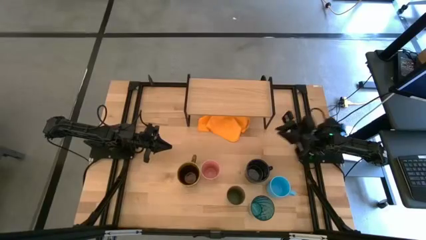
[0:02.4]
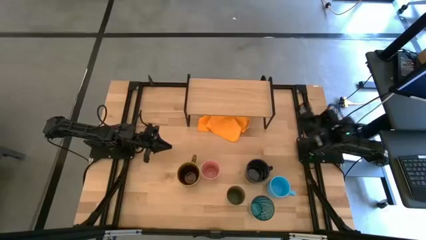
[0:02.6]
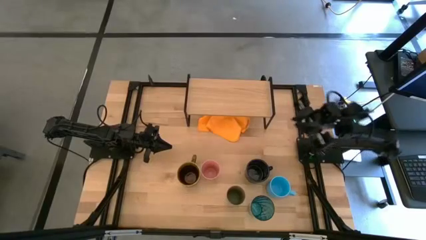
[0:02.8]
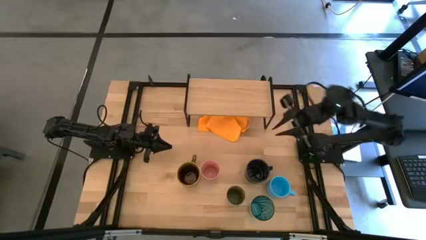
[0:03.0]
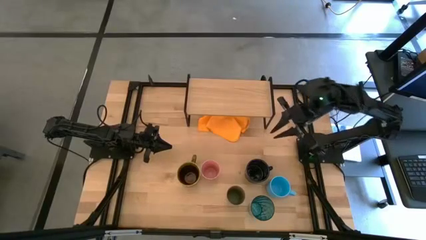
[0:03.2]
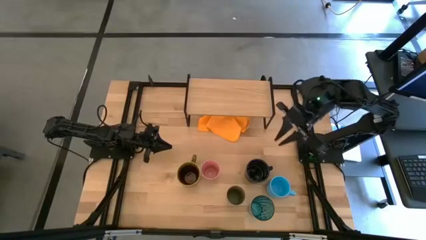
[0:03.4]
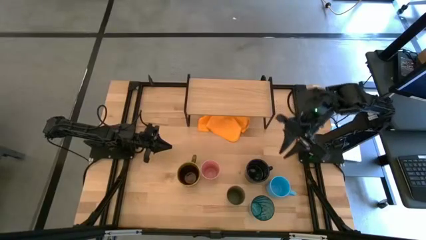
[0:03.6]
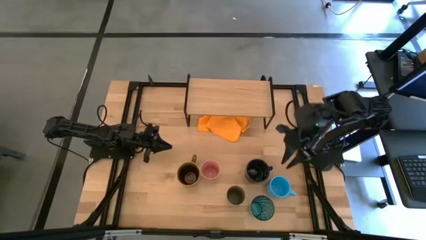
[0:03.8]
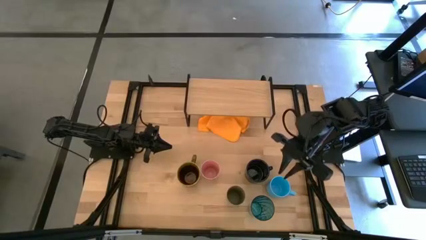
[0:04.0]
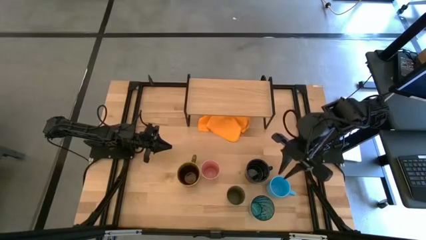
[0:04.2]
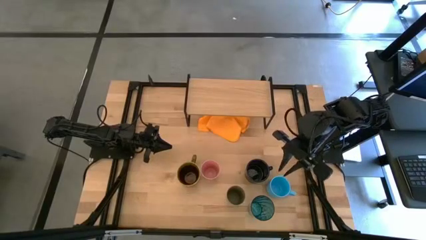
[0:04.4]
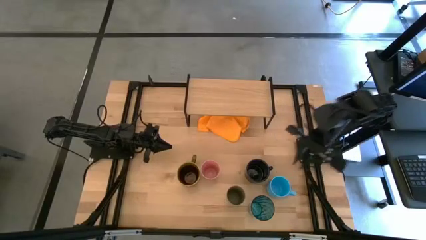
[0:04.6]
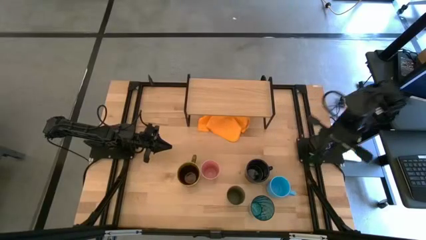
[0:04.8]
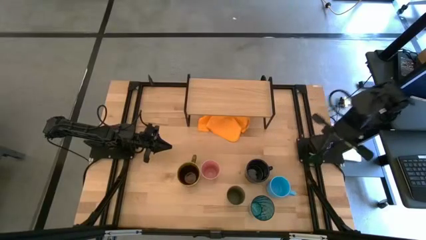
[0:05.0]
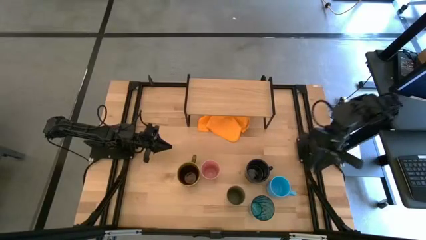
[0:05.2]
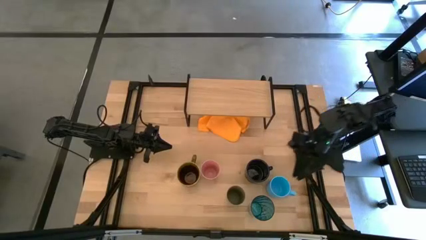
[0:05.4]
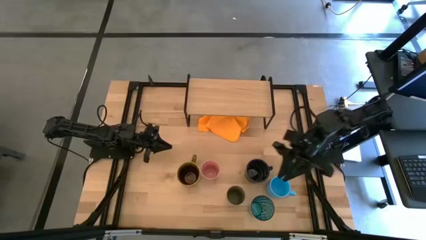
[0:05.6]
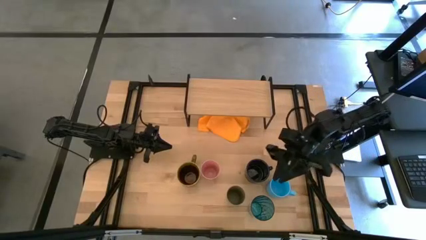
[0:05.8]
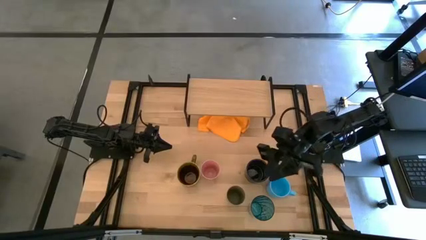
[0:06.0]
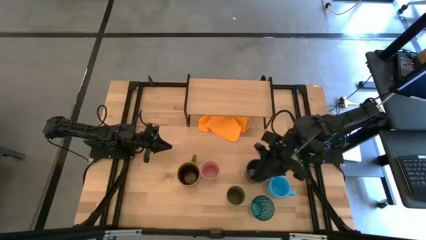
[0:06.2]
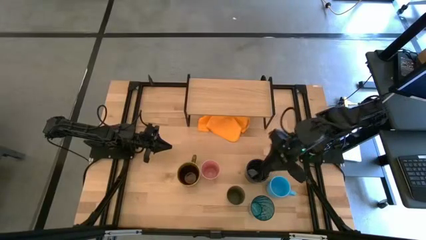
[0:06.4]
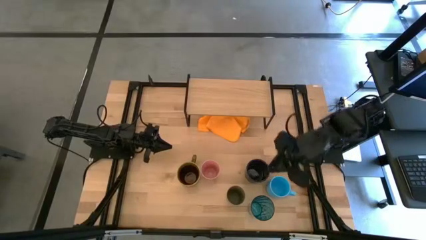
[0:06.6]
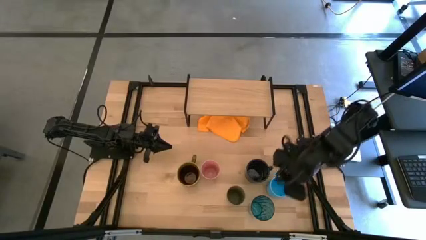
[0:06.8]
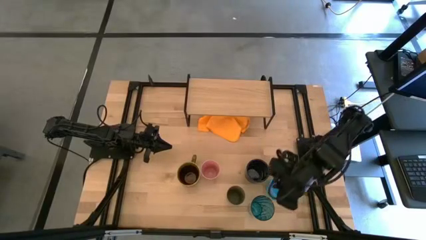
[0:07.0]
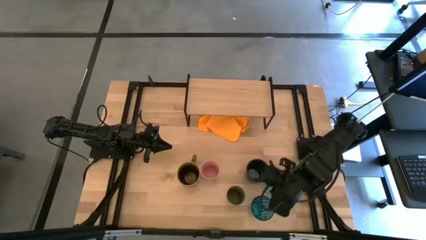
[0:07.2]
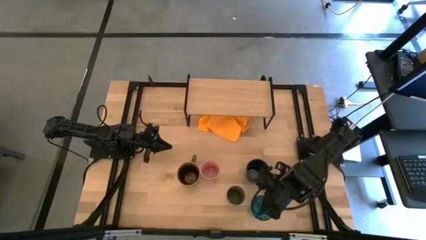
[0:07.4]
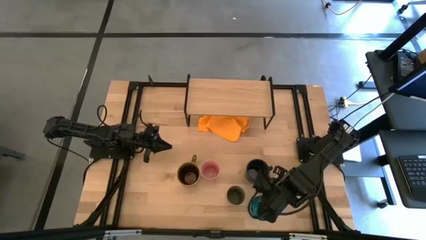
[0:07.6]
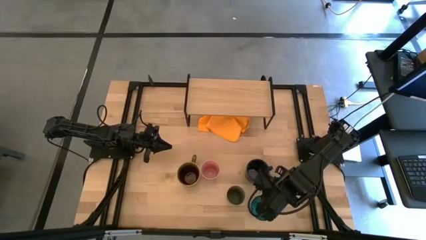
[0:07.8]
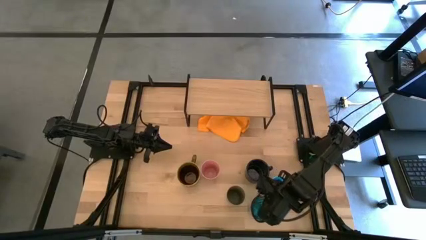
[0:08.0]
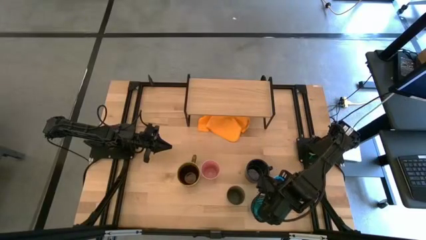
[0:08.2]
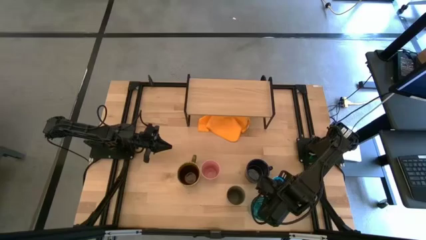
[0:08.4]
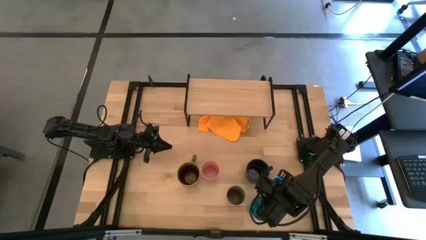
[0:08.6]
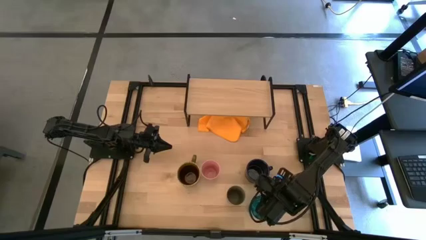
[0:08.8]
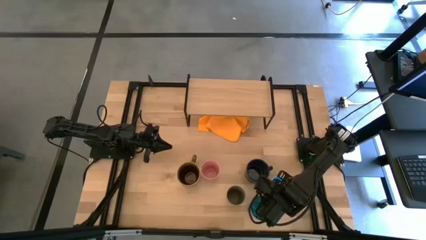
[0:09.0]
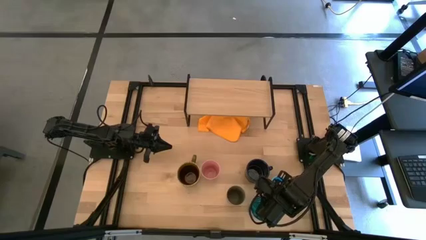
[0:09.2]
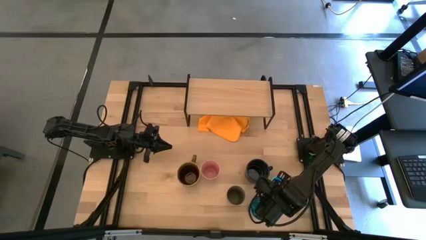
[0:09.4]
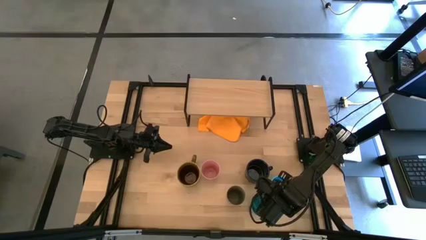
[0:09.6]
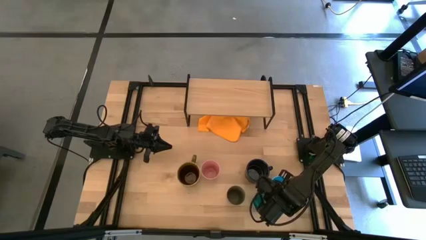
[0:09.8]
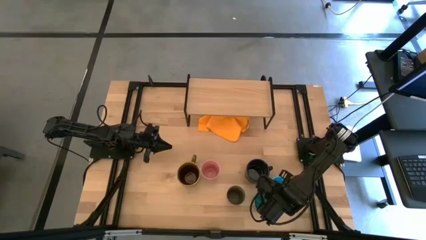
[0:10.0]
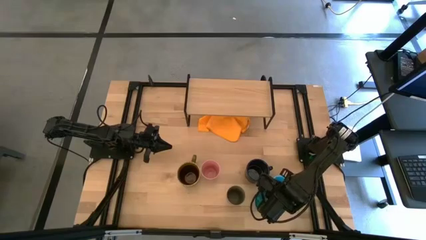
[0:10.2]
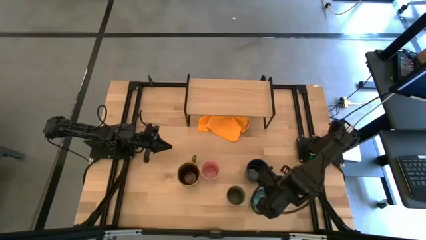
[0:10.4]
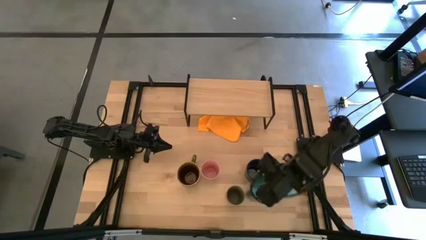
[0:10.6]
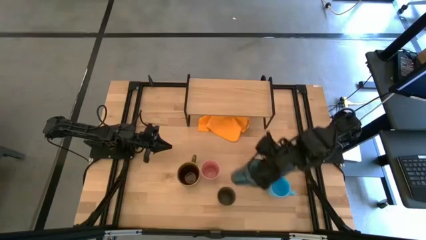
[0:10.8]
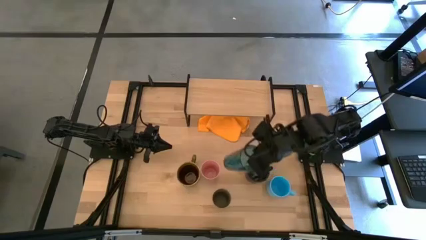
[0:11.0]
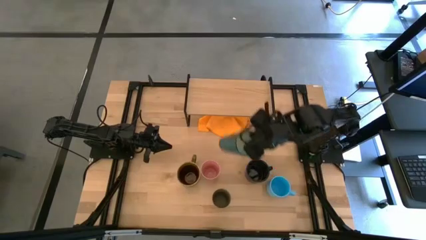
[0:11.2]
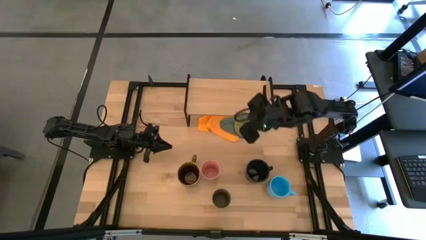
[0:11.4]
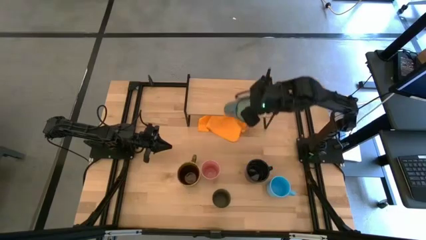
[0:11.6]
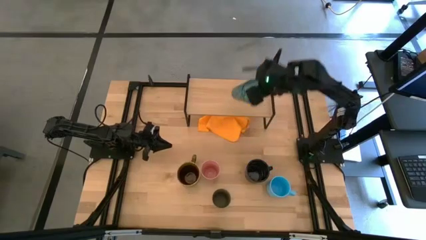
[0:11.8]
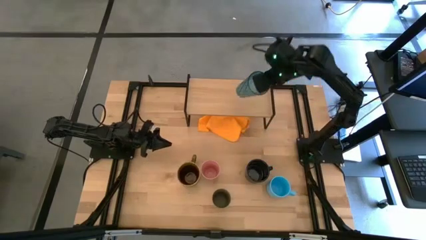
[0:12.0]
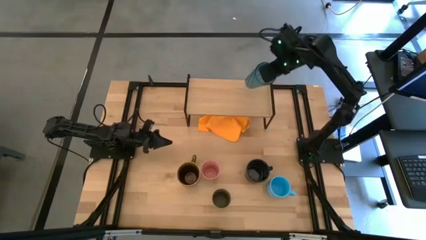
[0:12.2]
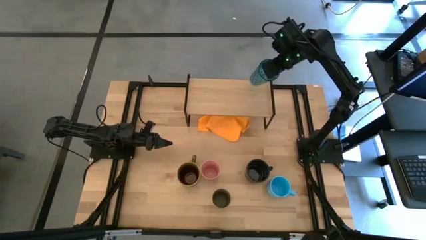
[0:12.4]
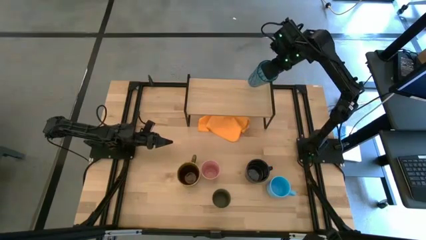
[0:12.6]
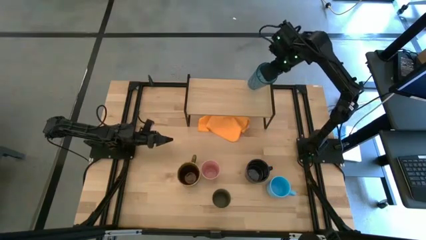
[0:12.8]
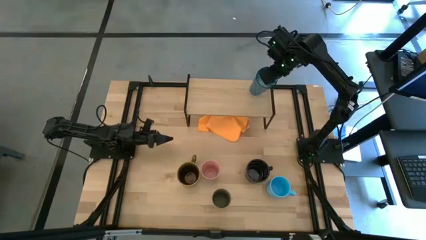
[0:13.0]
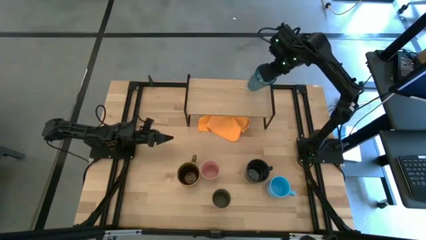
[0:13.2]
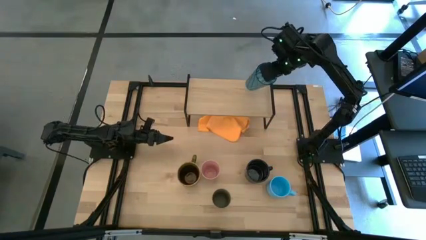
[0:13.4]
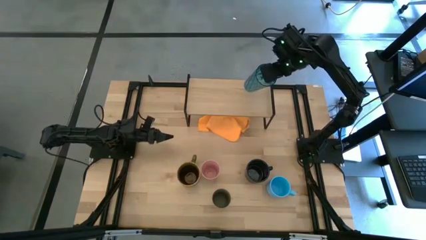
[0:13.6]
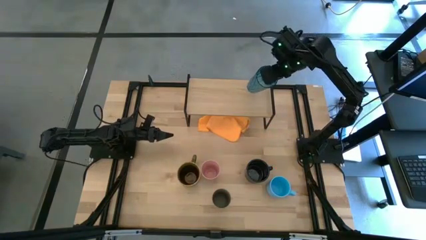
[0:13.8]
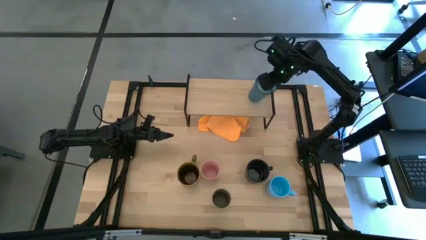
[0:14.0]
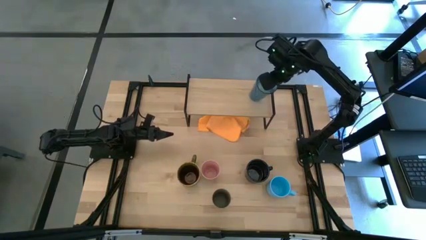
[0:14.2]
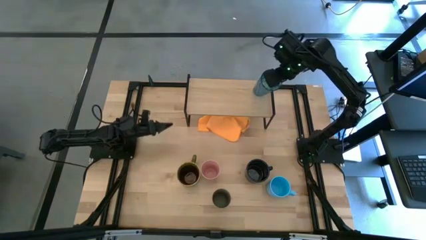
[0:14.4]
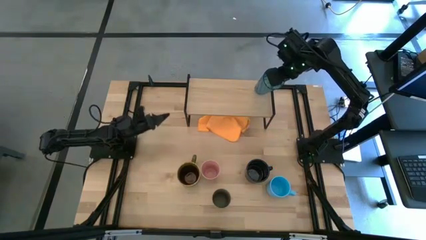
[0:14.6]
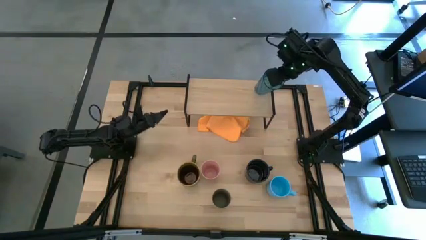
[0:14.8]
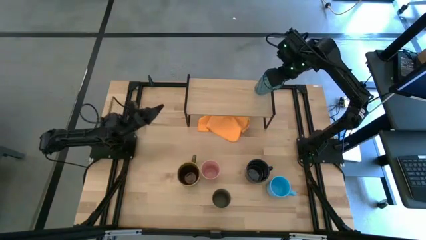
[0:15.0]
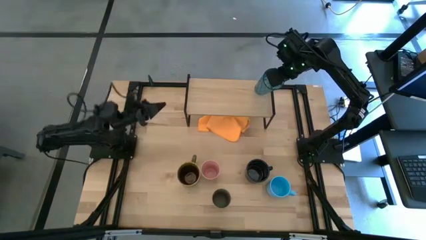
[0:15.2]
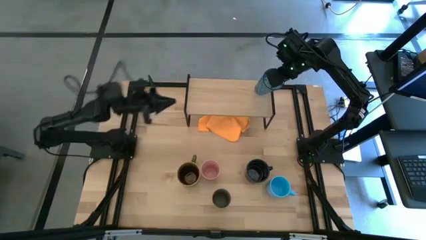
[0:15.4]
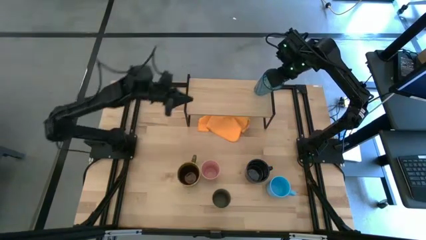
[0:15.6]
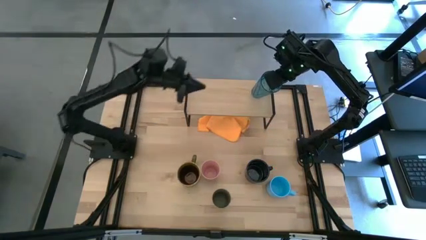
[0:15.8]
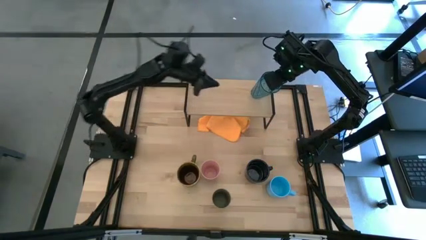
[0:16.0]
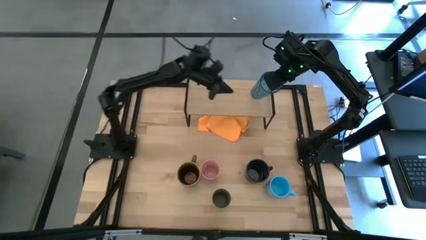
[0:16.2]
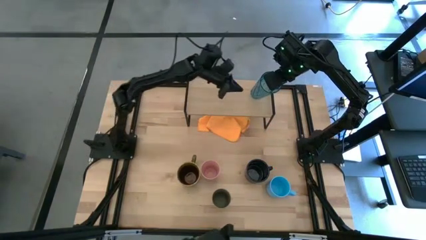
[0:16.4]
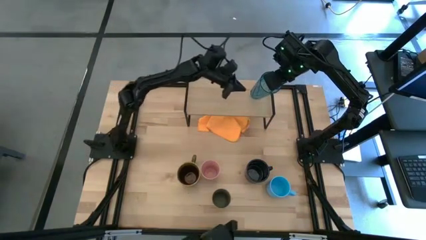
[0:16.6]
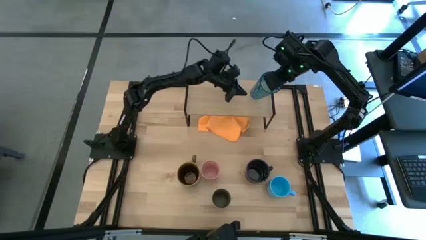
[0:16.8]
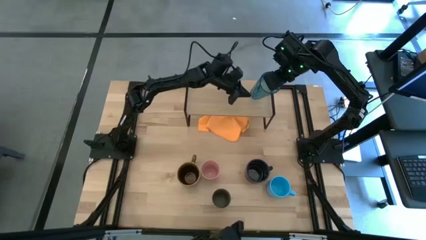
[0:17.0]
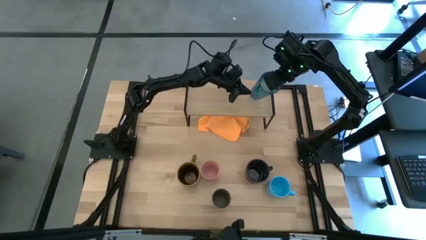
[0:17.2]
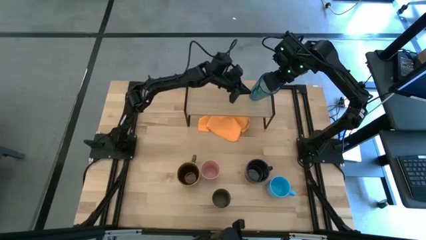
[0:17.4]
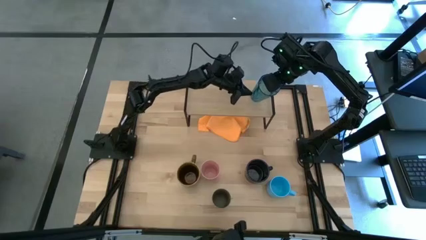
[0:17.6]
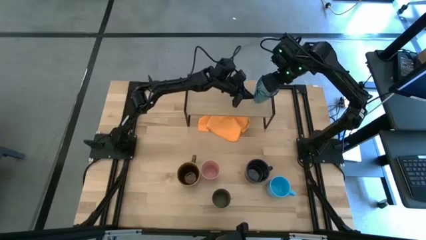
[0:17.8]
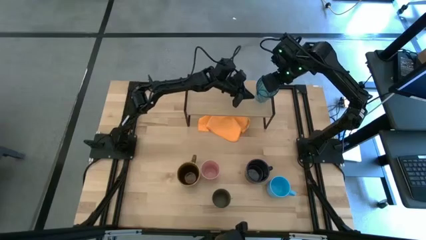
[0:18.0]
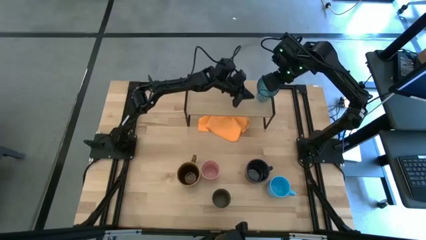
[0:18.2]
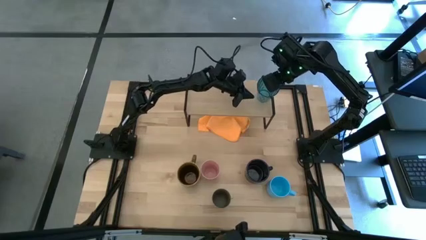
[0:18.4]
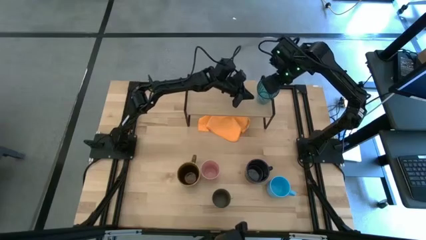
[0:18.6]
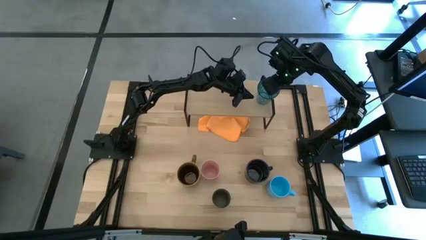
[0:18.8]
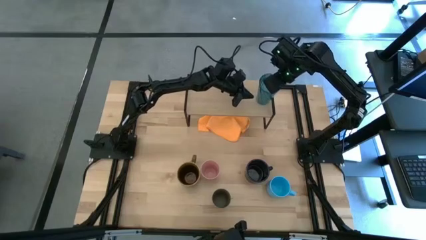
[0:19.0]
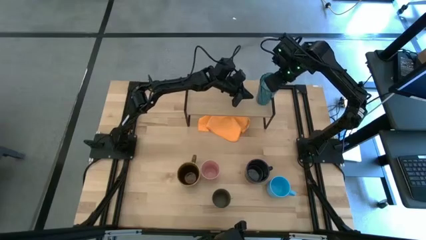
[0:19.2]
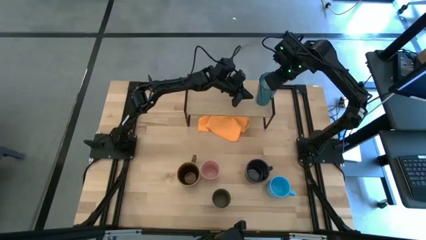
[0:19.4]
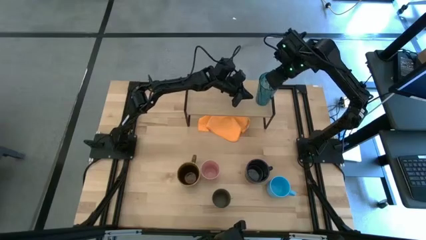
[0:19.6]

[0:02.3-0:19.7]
Task: Stack small to large cups/mugs on shelf
Put the blue cup on the shelf
